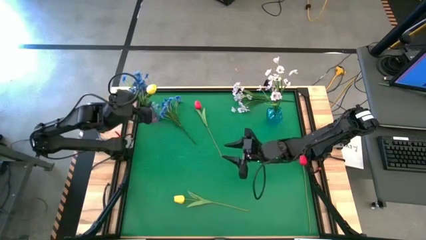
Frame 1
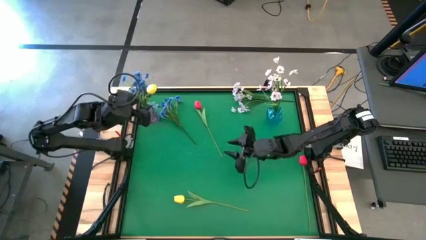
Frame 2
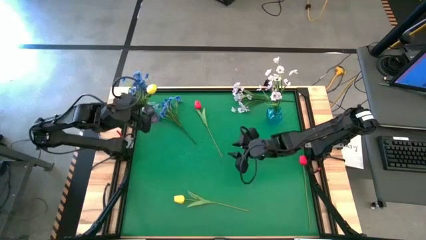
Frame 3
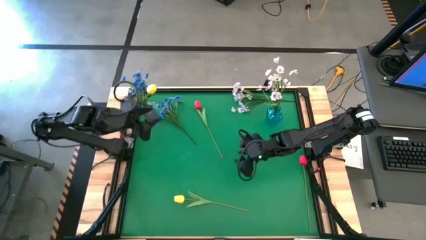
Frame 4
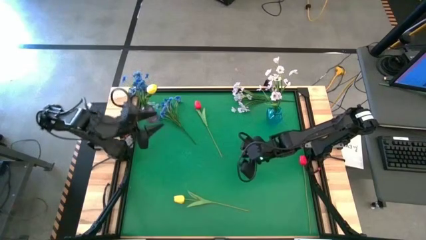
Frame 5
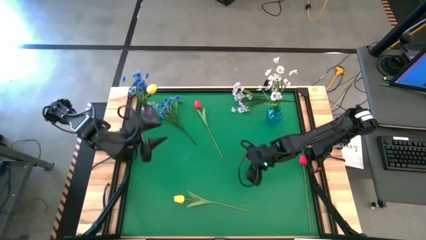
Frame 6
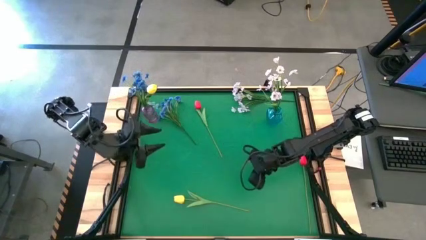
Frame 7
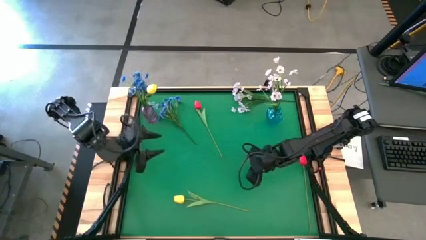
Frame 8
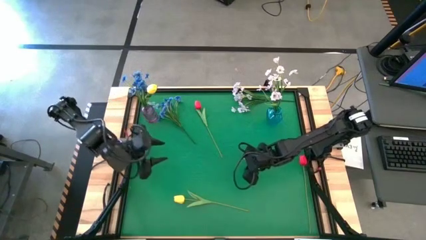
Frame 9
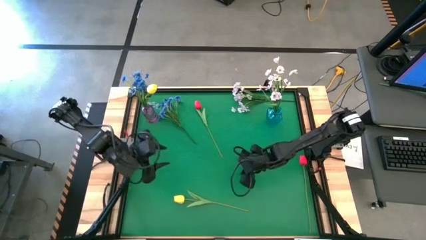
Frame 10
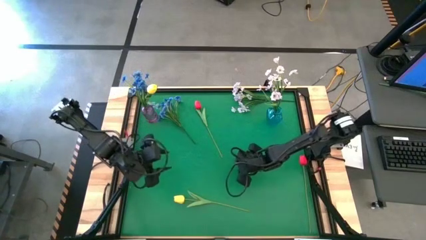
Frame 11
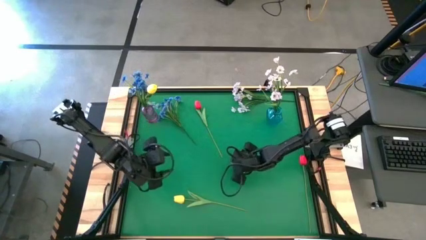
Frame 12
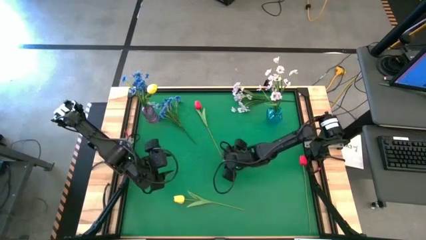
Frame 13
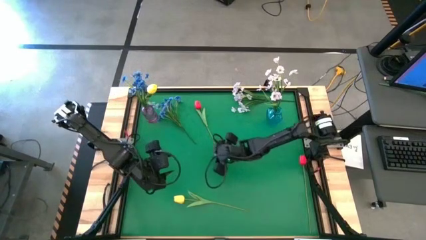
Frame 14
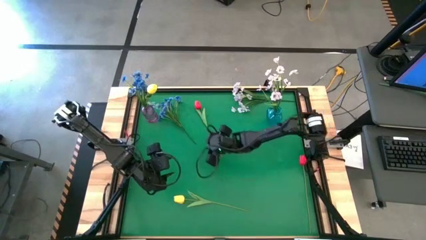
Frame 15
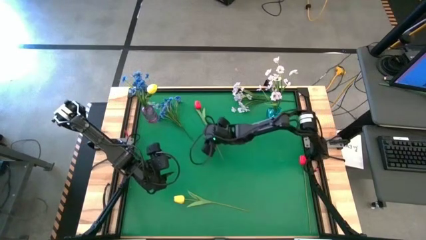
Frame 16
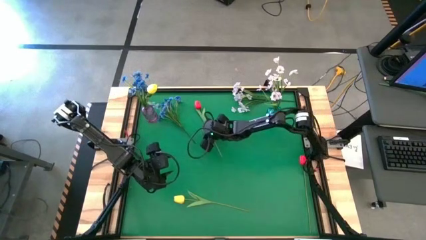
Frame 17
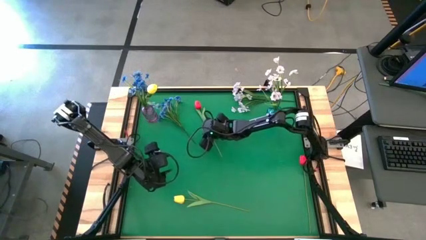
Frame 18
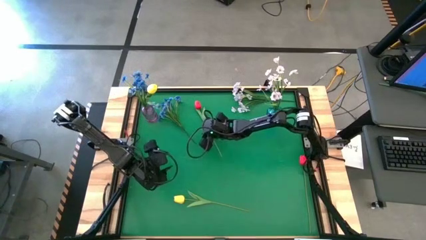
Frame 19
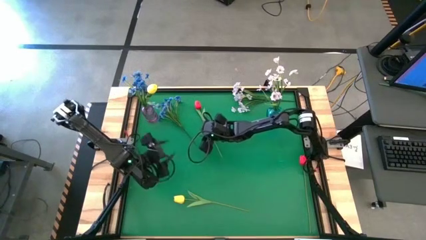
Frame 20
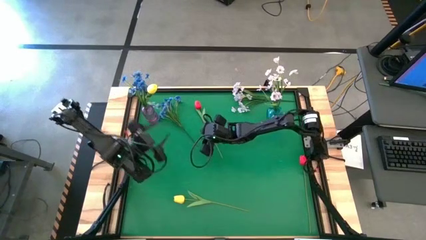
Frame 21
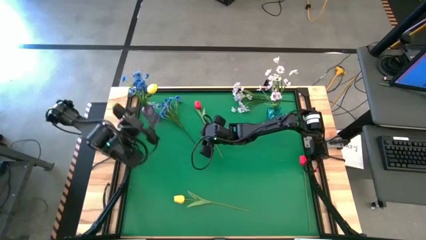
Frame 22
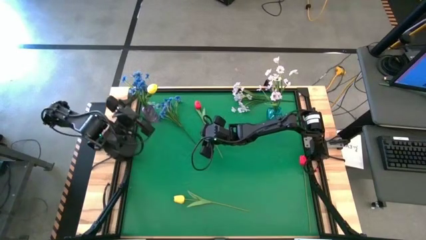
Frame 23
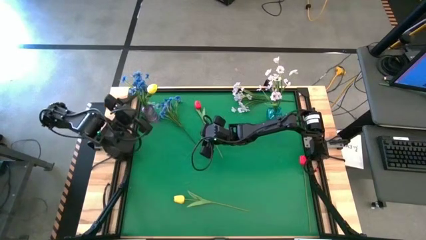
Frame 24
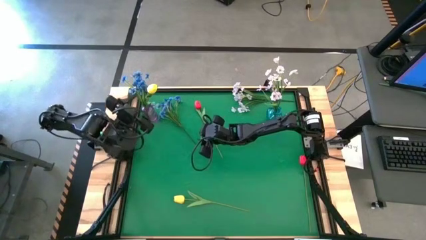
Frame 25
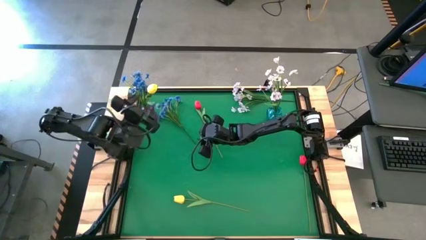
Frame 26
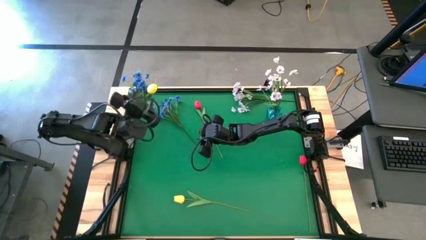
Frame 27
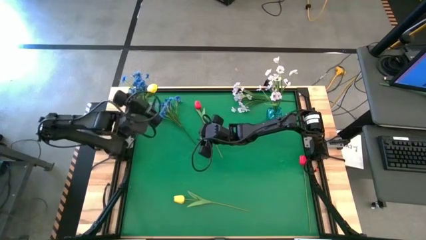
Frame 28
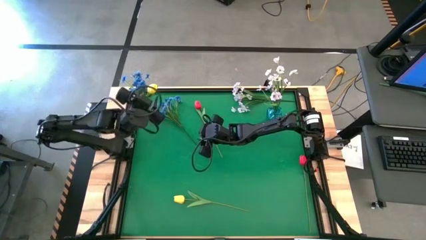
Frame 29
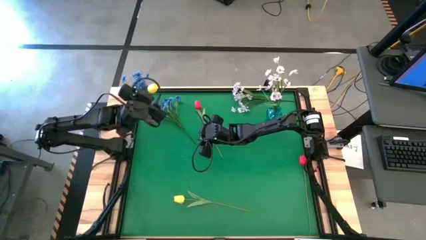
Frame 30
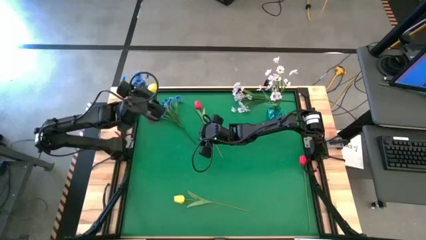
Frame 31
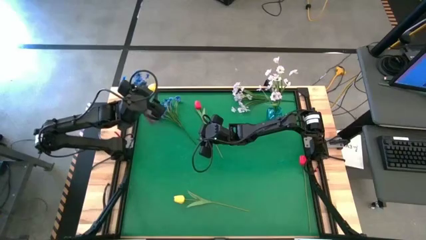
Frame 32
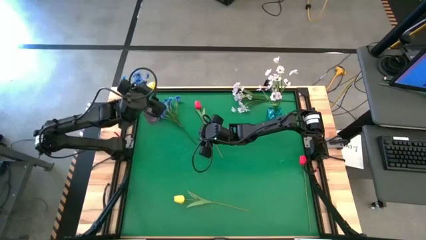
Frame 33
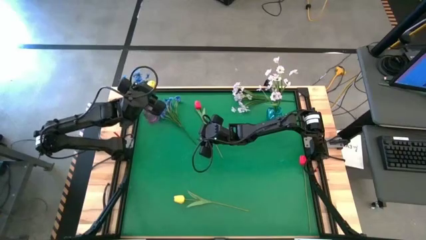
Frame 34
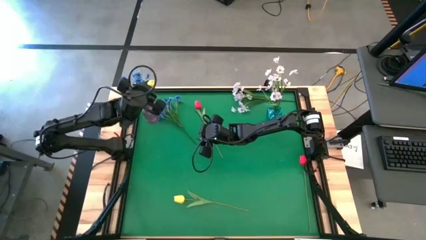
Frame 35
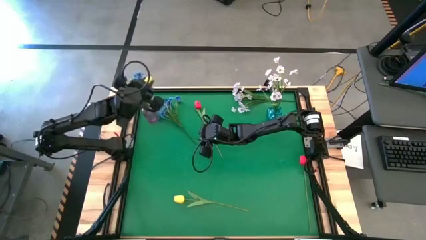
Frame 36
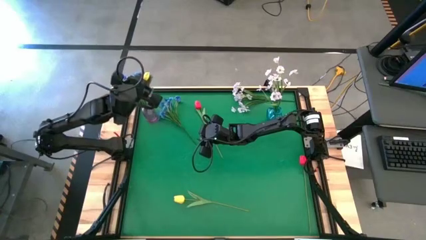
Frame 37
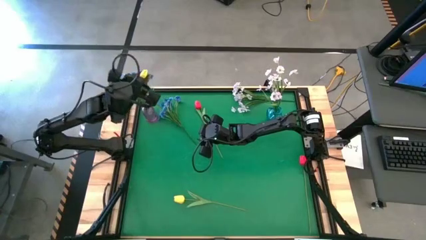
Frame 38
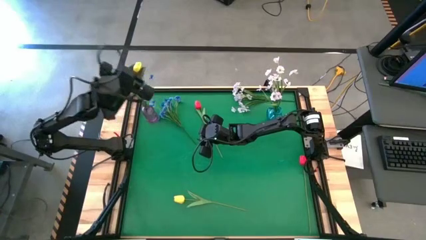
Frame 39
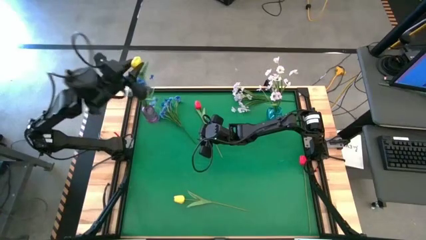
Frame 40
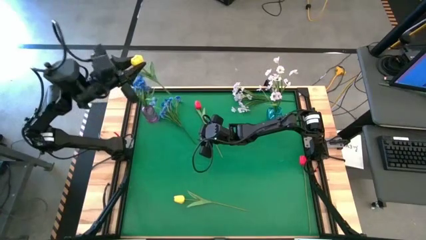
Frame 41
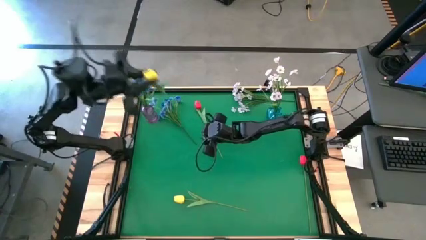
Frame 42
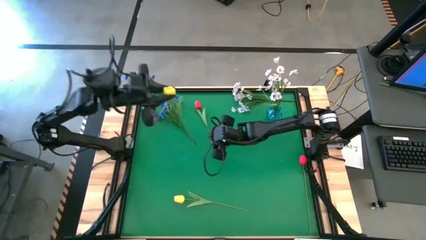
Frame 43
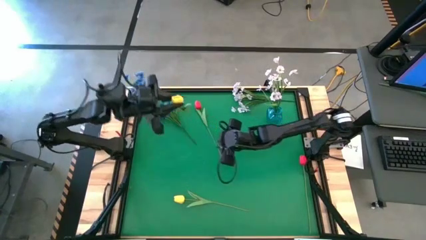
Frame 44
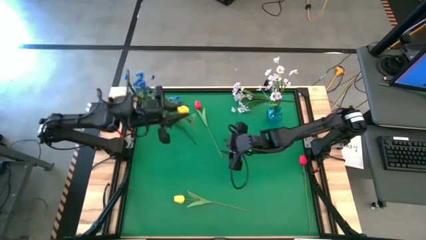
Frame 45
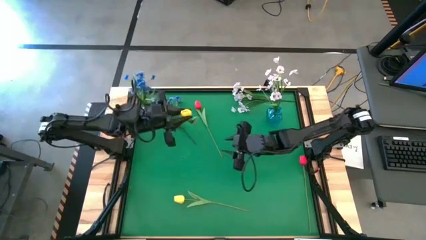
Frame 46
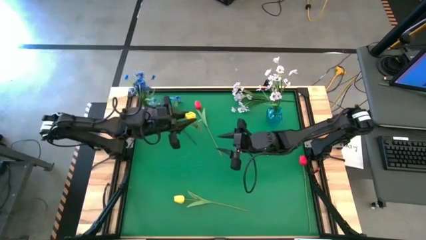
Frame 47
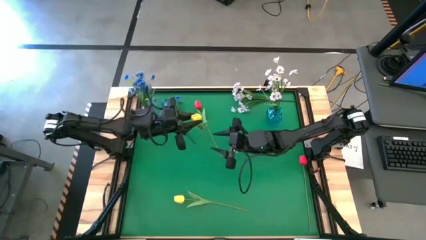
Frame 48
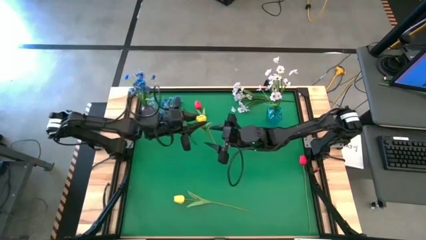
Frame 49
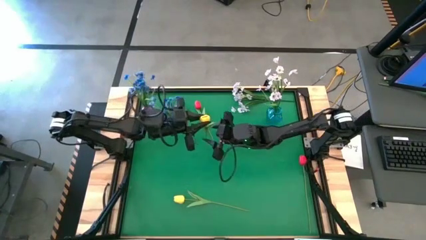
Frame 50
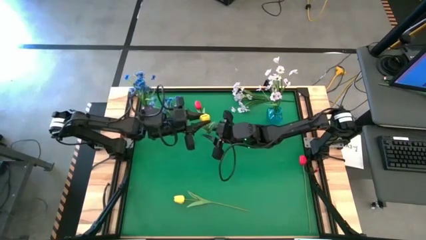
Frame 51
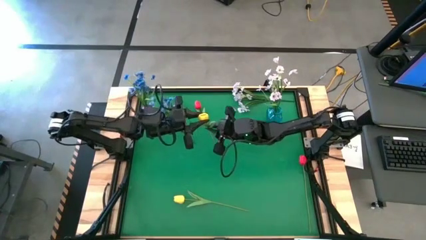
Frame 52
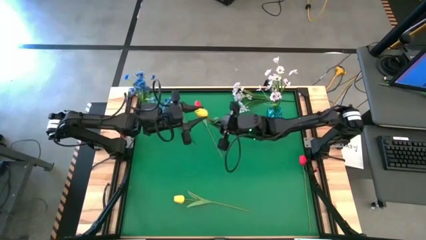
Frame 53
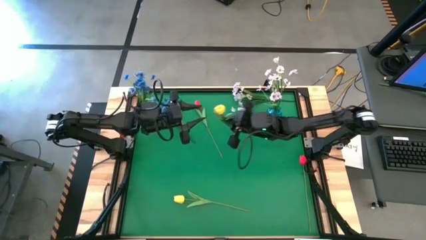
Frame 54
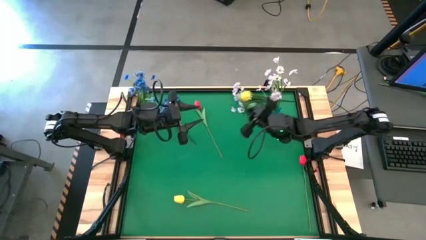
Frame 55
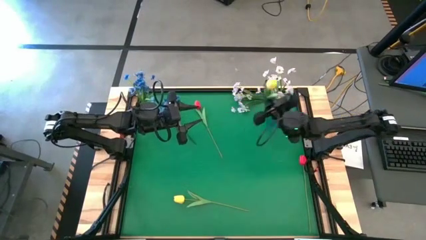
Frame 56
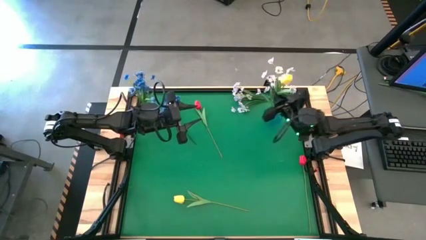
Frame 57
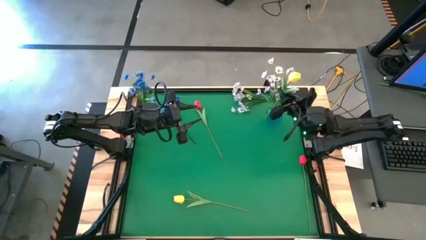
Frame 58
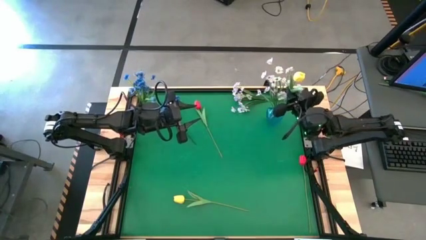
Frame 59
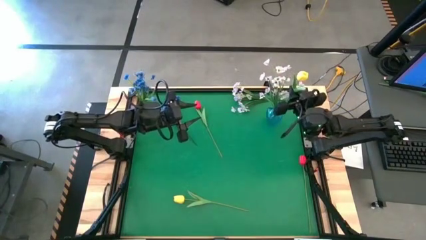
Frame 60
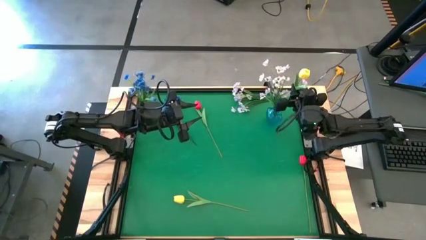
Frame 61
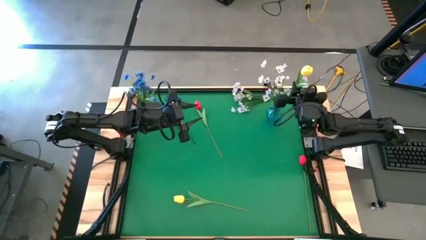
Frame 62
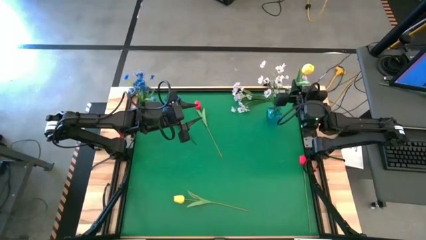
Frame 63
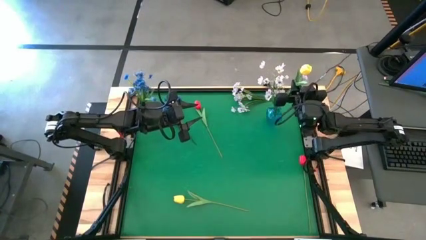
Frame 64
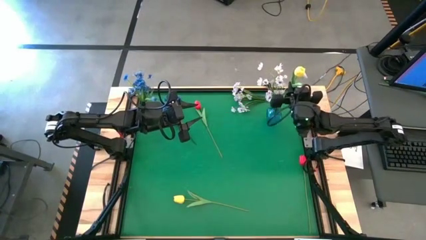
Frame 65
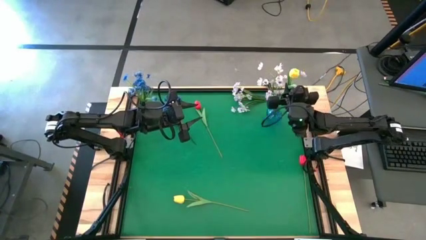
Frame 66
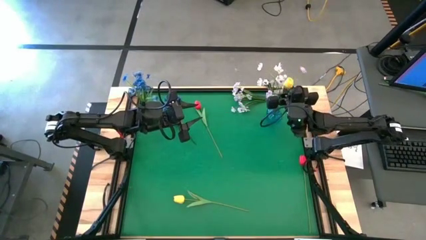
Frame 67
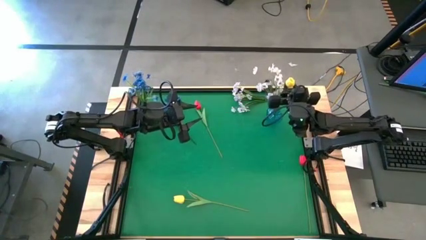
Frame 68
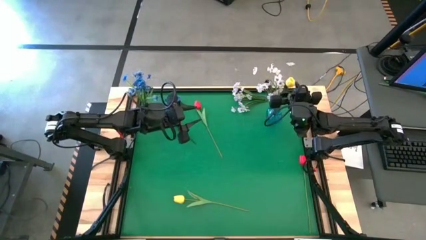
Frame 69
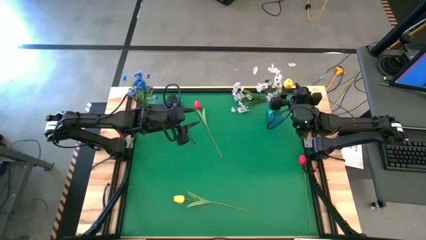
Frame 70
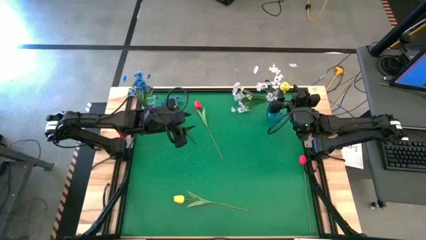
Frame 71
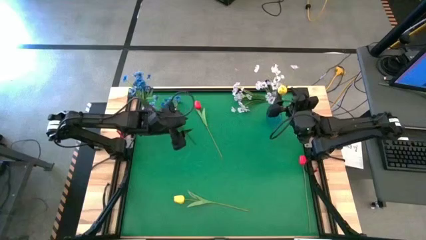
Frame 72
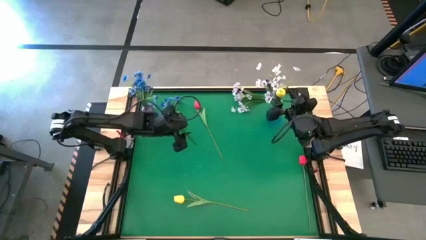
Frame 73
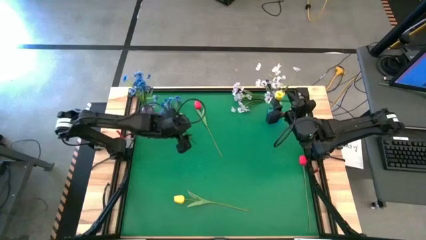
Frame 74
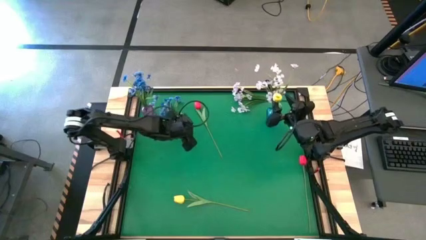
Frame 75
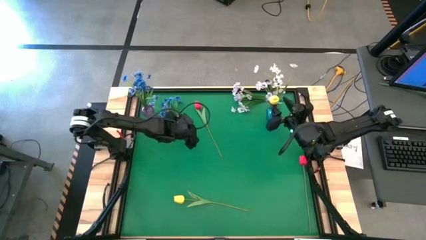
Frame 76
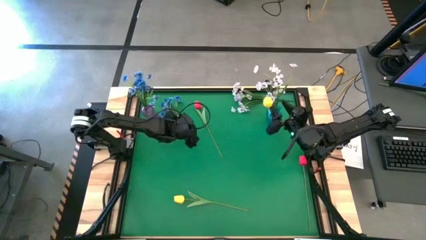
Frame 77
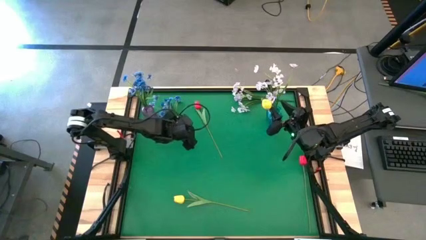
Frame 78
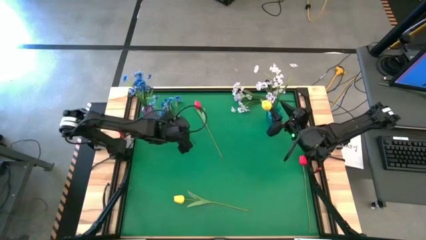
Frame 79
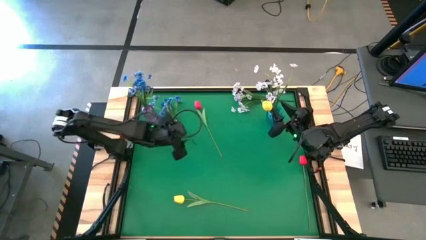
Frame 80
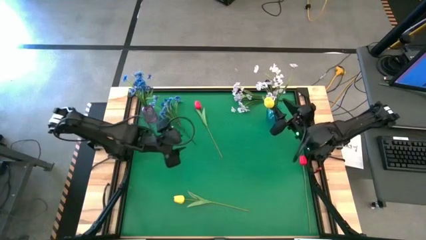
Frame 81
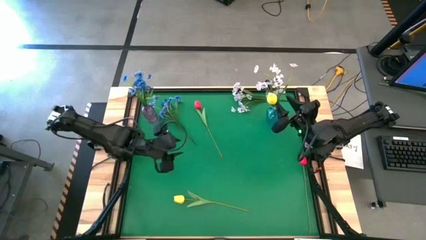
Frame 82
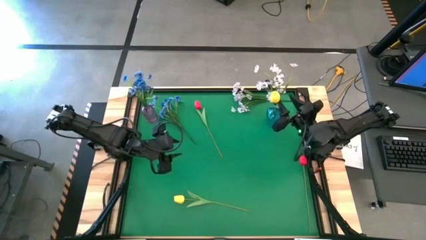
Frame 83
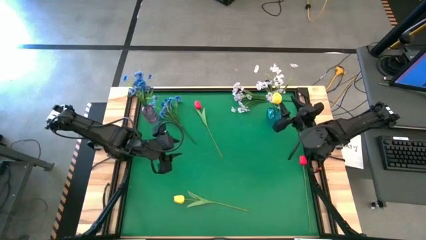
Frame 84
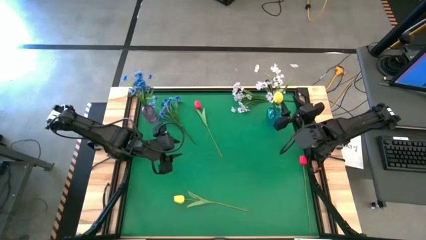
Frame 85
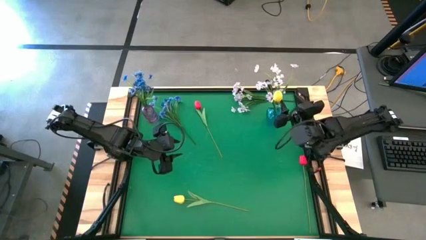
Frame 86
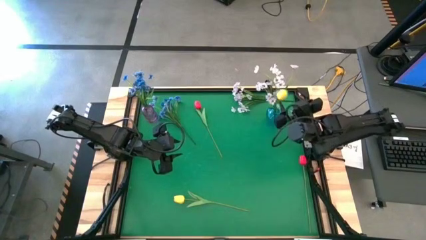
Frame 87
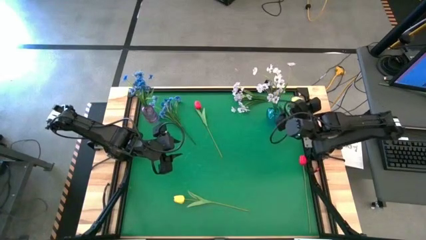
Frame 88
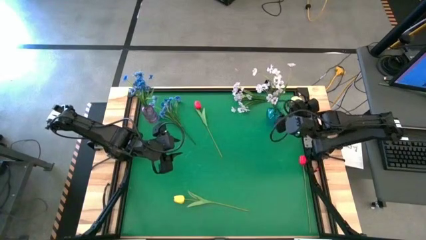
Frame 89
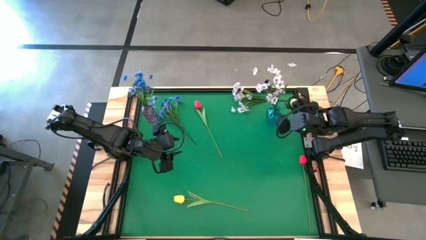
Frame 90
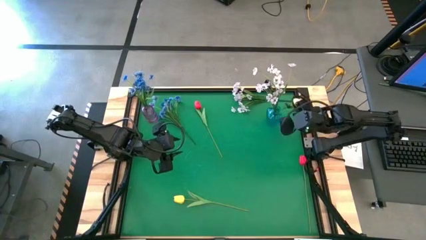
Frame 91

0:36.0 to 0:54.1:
Task: Sort flowers into vase by color
Put the top yellow tulip into the purple vase
